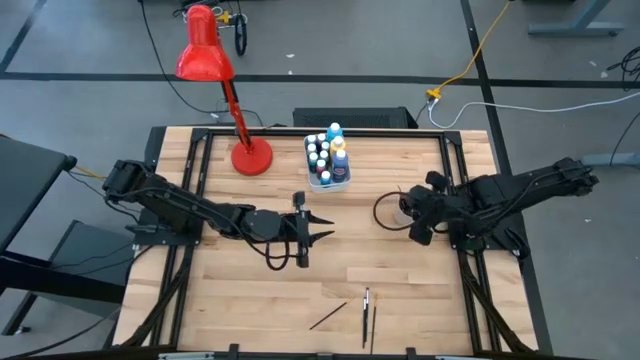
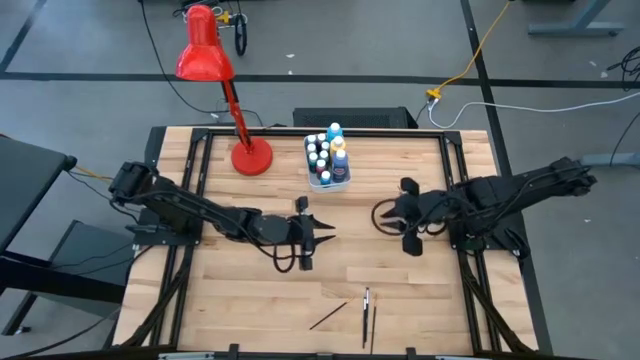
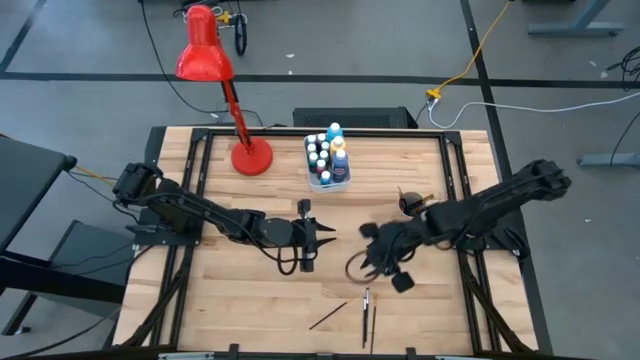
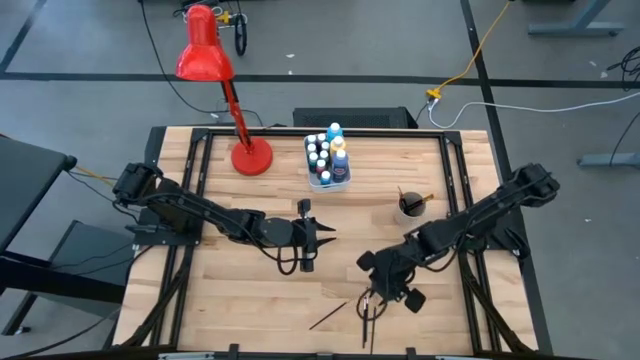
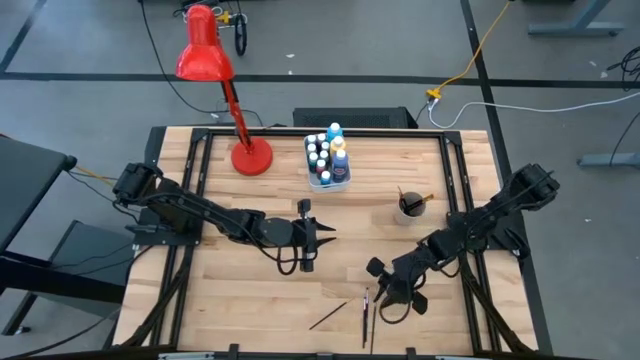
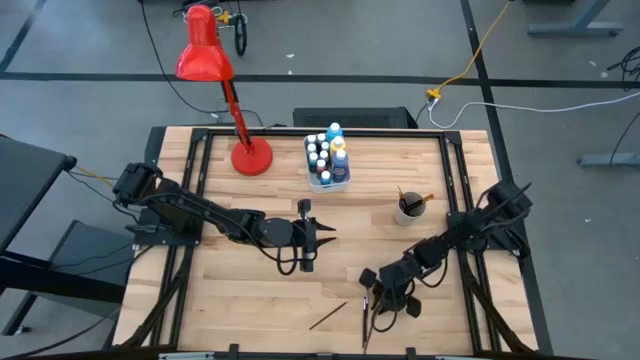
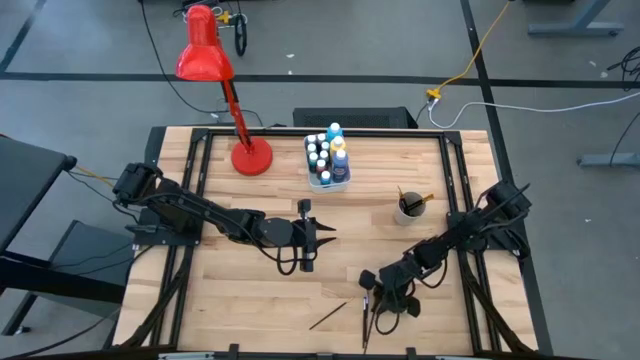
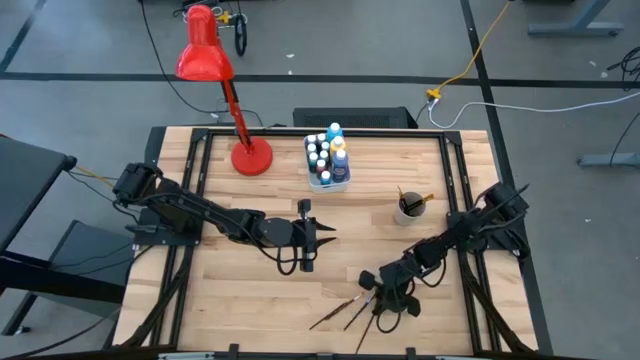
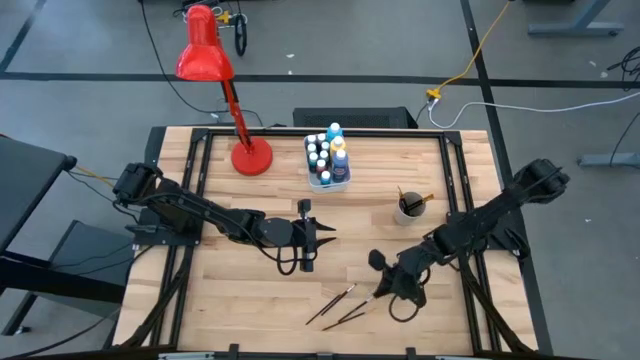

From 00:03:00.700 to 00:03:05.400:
Task: Pick & Place Paint Supplies
Put the gold paint brush into the gray cup

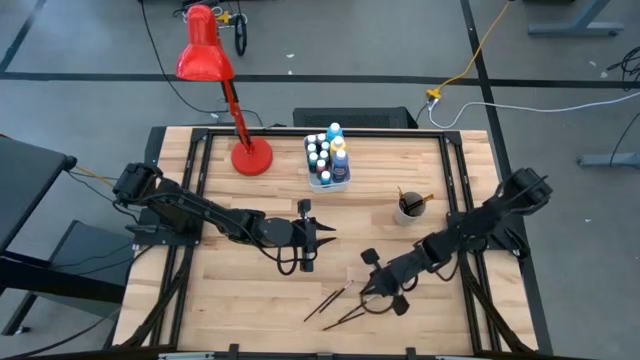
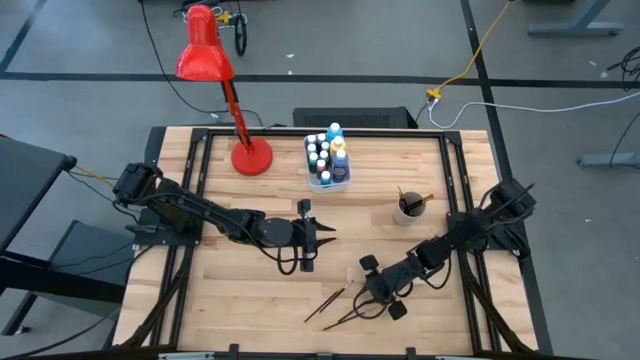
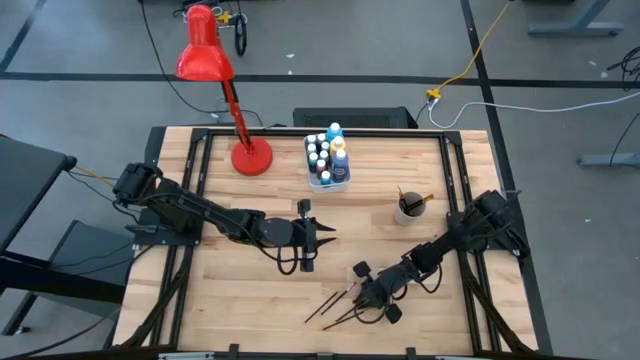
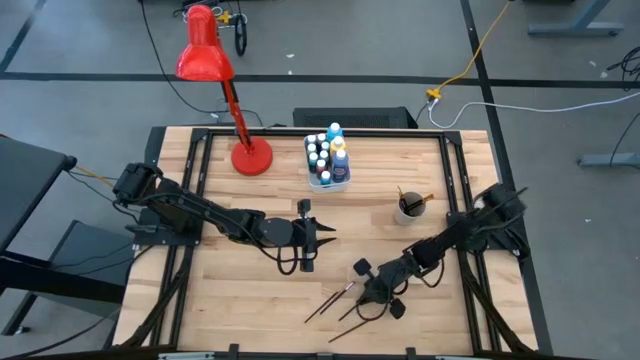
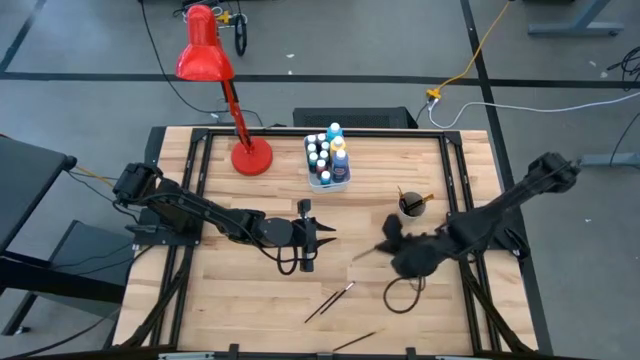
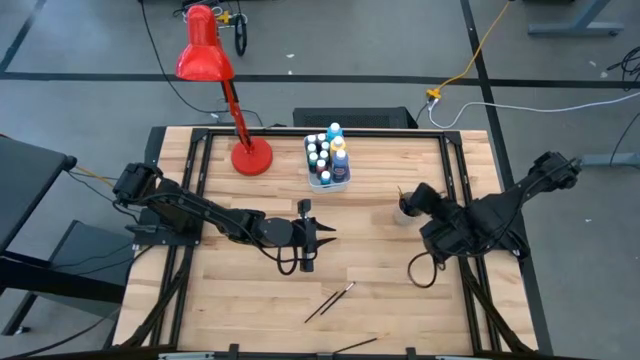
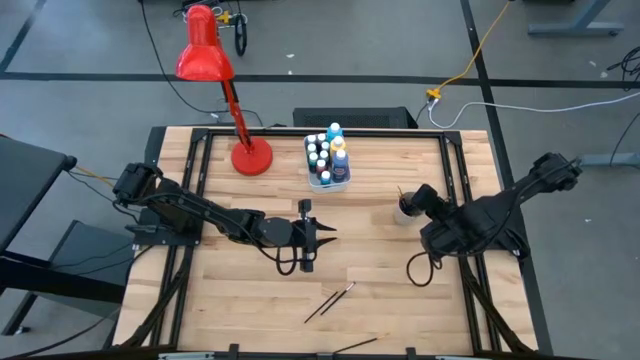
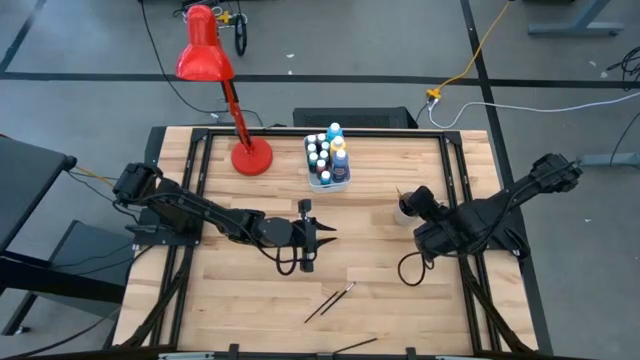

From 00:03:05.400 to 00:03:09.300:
Put the silver paint brush into the gray cup

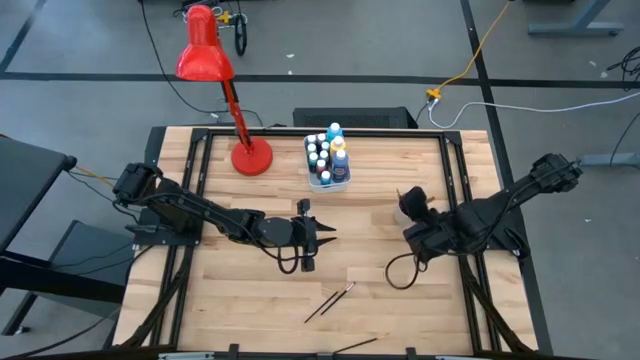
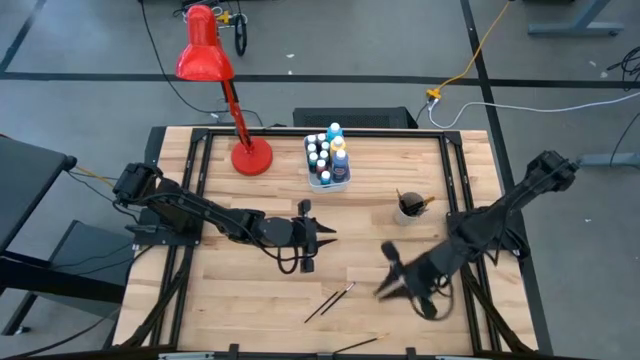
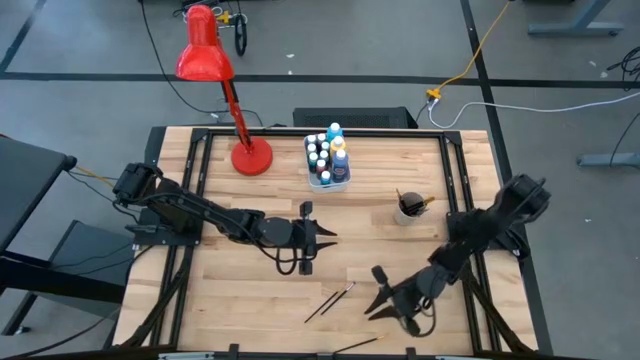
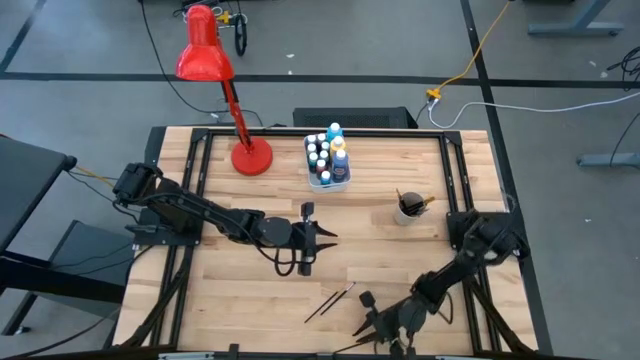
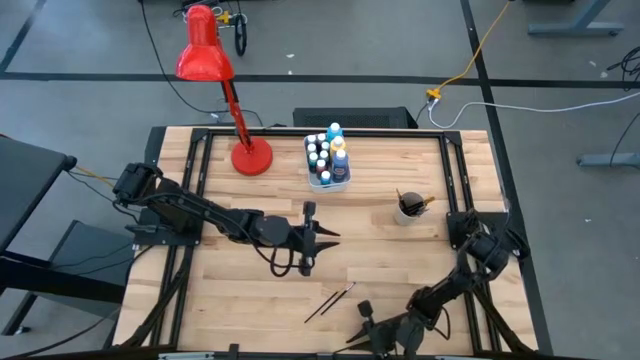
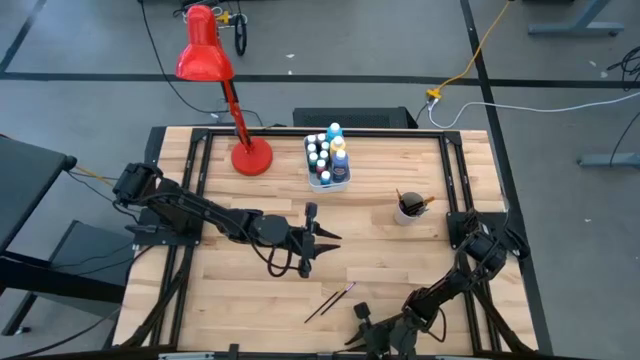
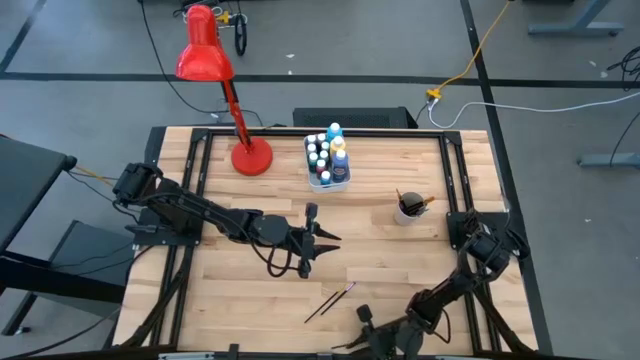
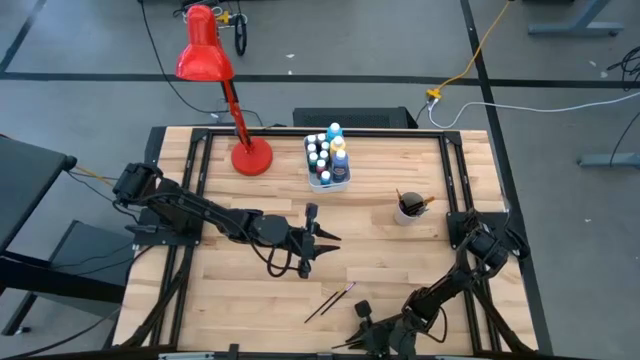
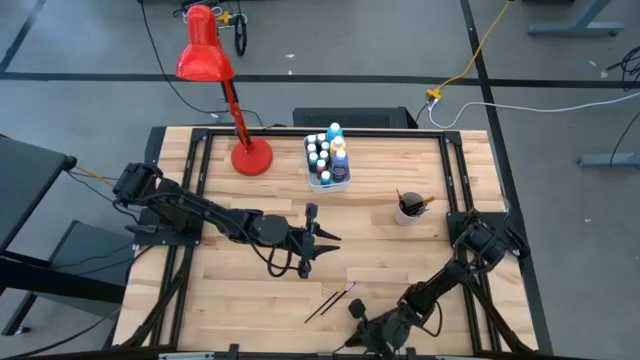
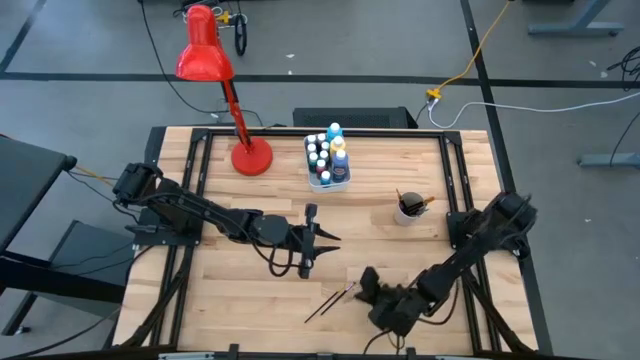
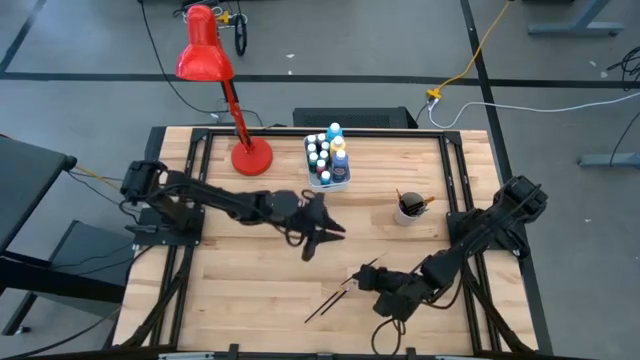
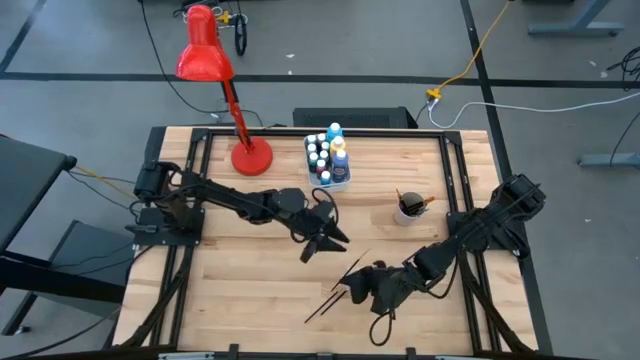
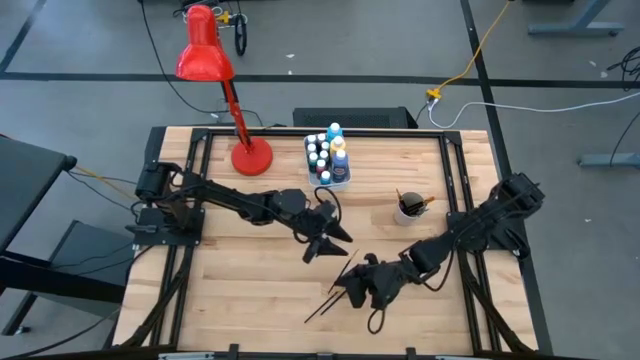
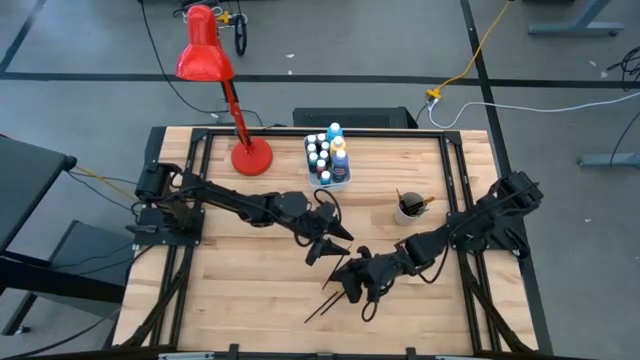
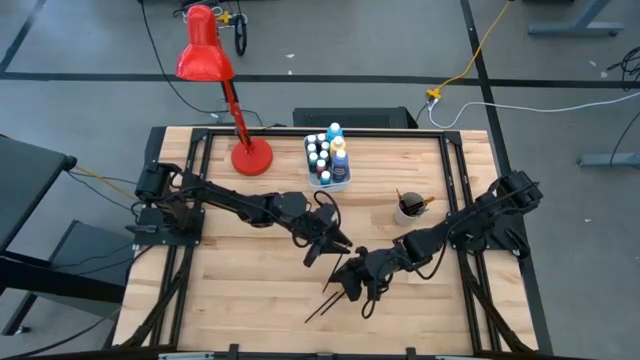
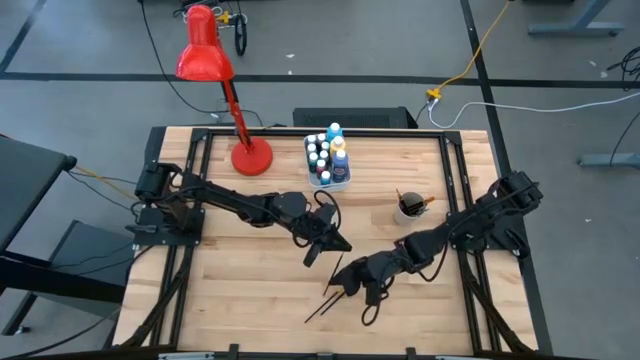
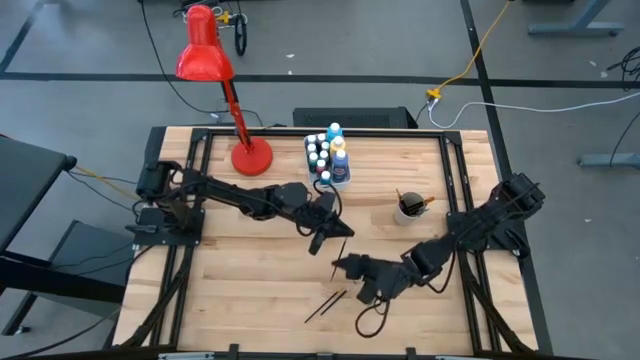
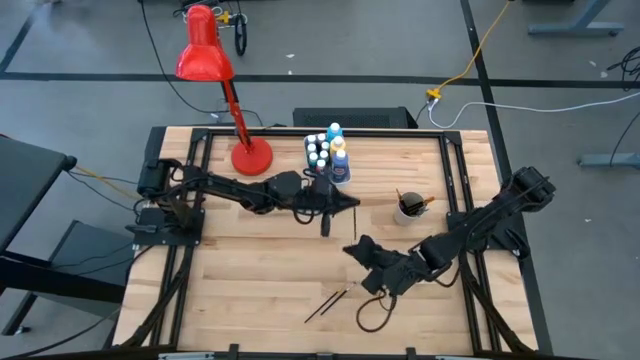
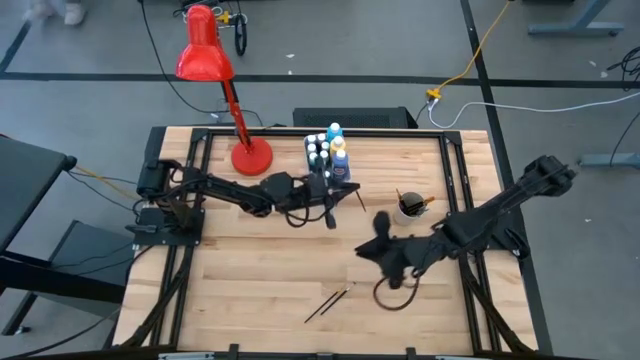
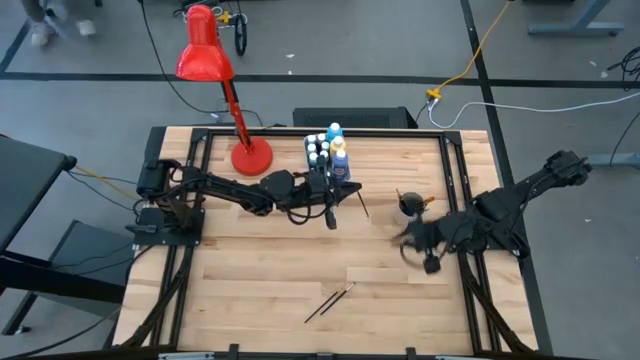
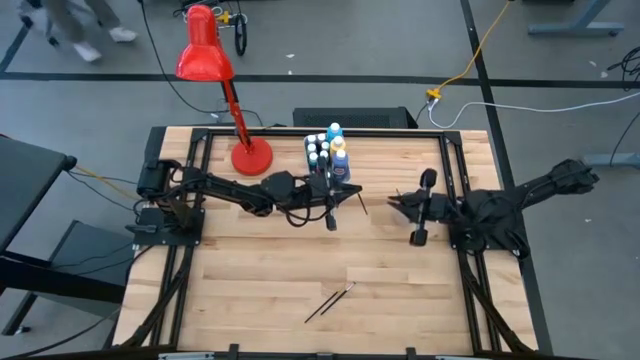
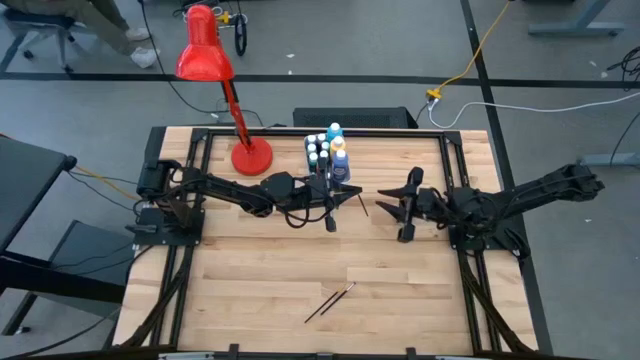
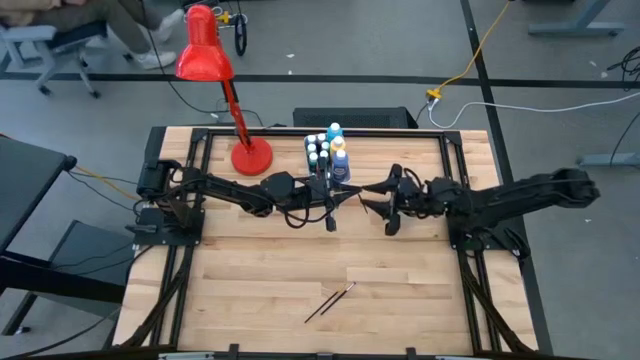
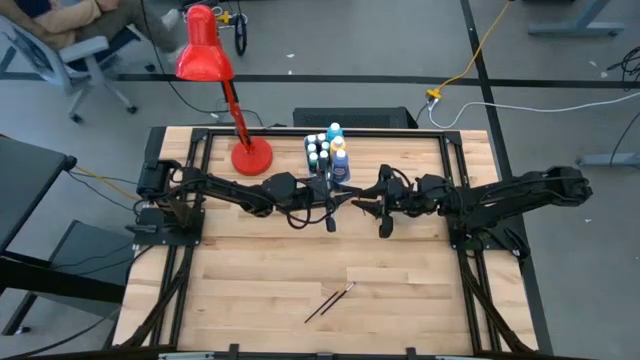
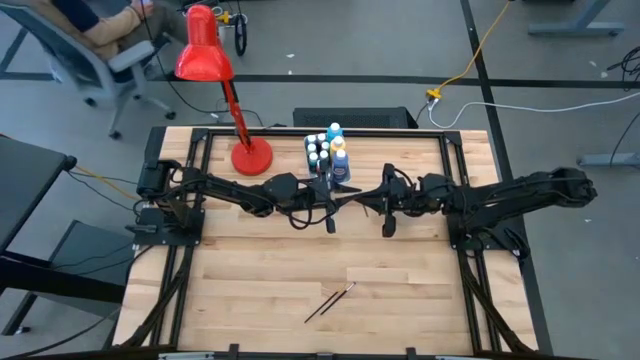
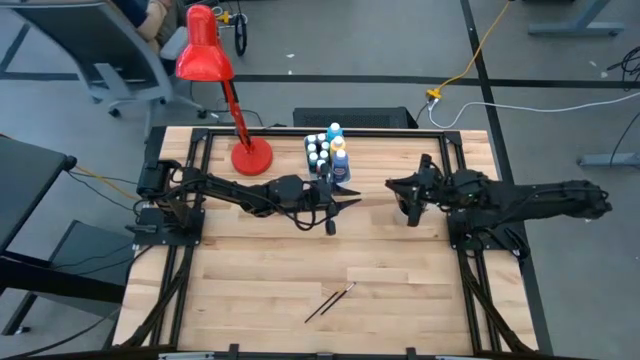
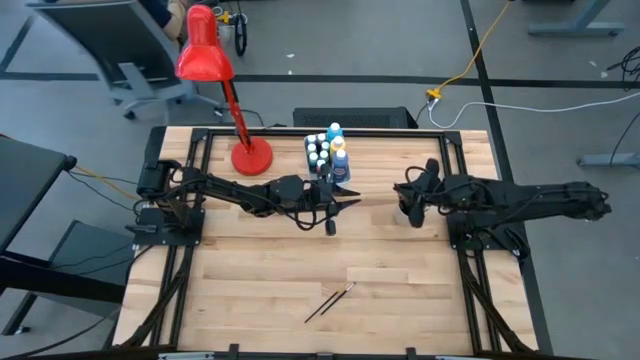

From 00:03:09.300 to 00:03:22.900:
Put the gold paint brush into the gray cup
